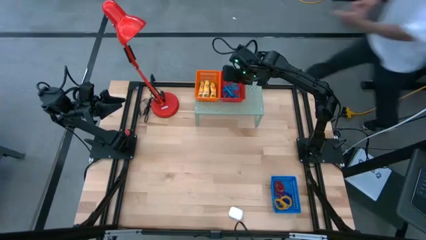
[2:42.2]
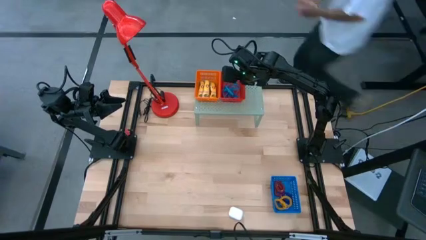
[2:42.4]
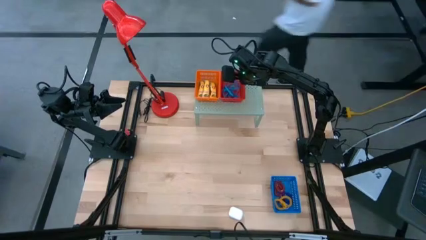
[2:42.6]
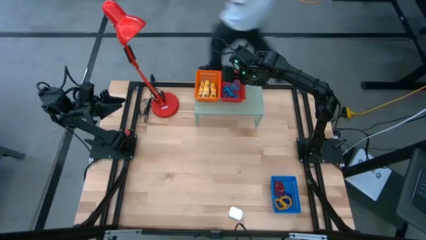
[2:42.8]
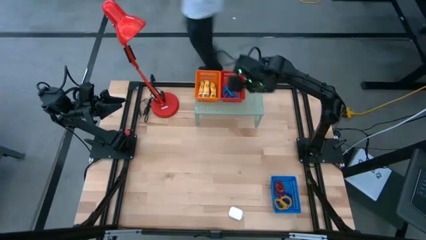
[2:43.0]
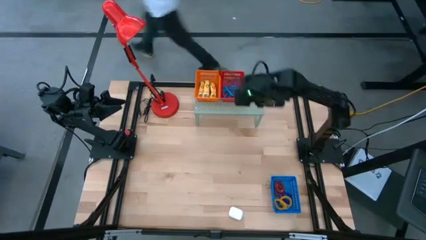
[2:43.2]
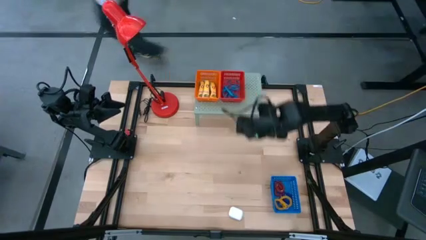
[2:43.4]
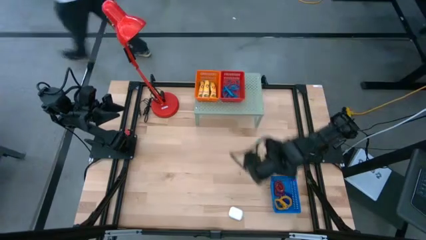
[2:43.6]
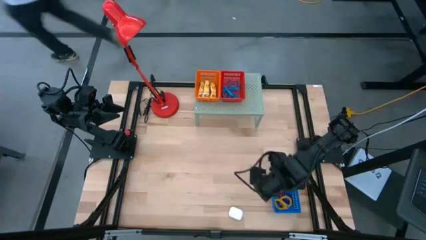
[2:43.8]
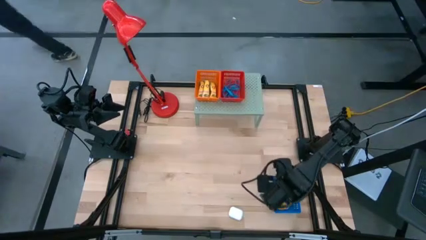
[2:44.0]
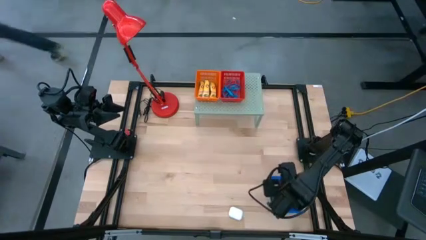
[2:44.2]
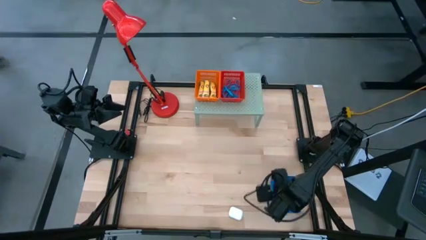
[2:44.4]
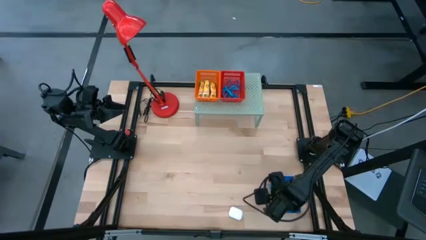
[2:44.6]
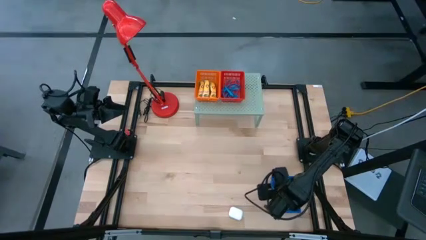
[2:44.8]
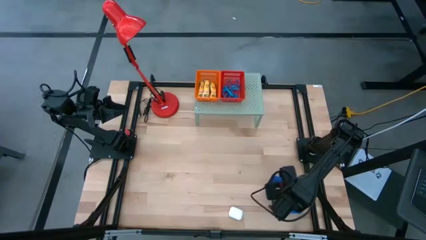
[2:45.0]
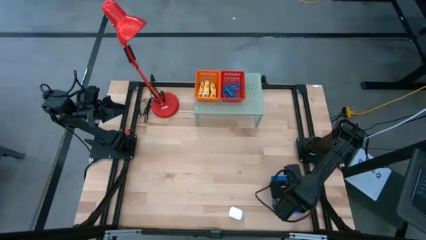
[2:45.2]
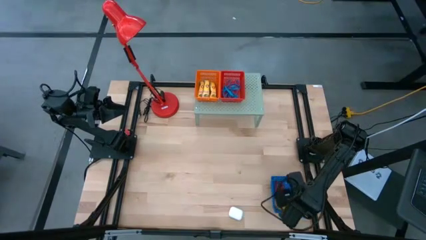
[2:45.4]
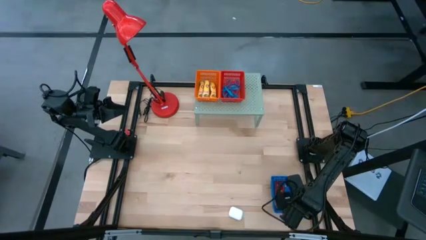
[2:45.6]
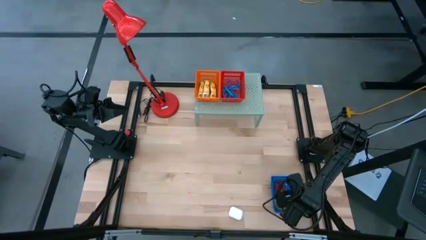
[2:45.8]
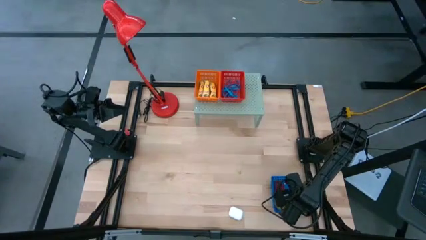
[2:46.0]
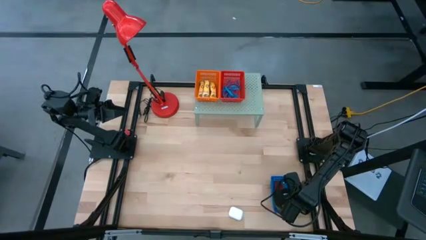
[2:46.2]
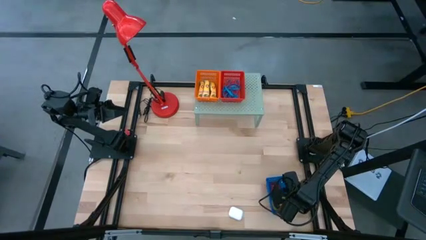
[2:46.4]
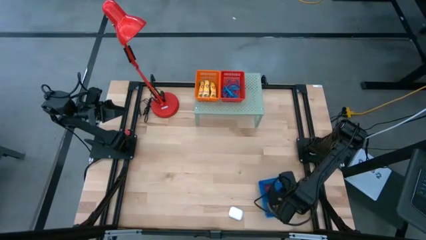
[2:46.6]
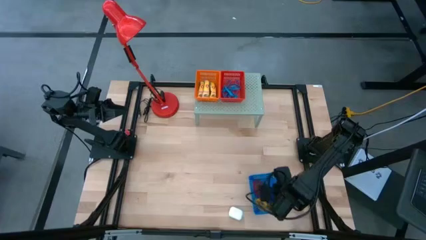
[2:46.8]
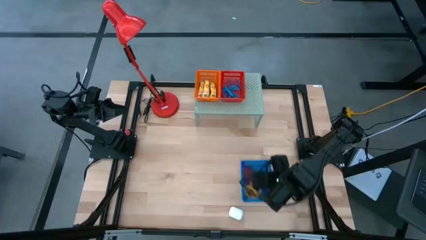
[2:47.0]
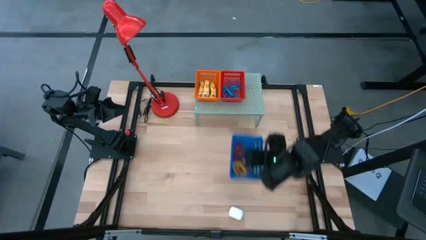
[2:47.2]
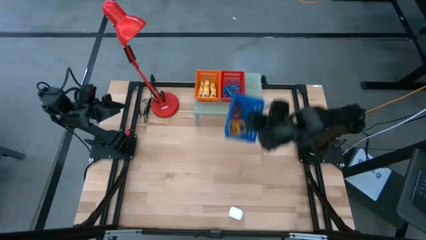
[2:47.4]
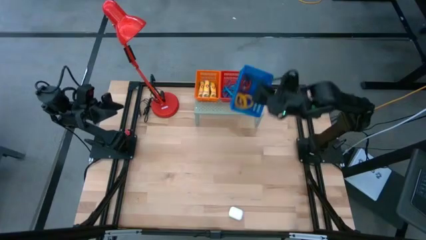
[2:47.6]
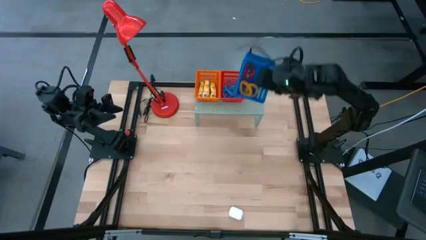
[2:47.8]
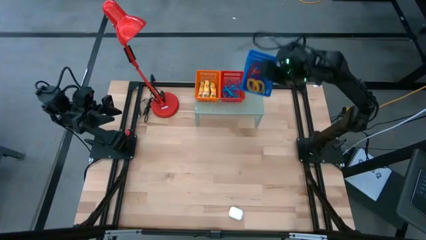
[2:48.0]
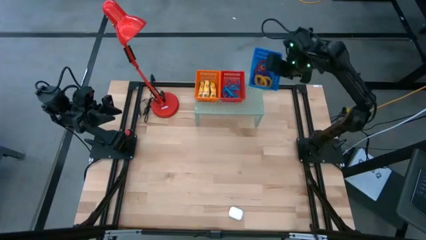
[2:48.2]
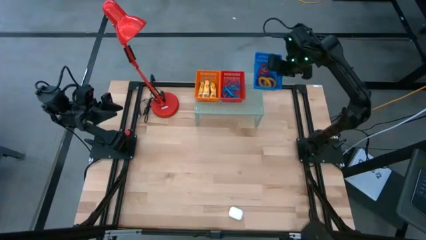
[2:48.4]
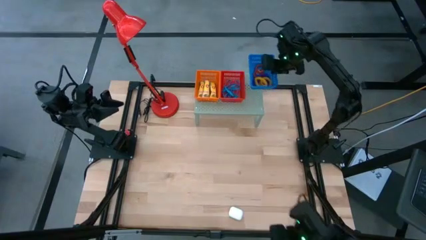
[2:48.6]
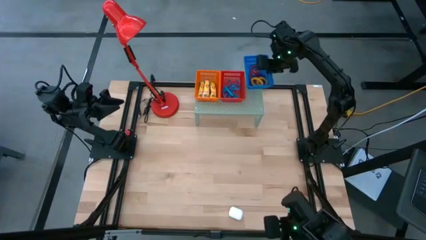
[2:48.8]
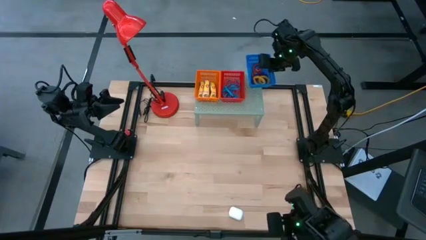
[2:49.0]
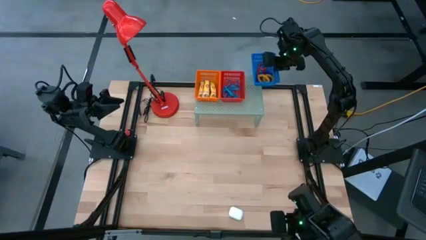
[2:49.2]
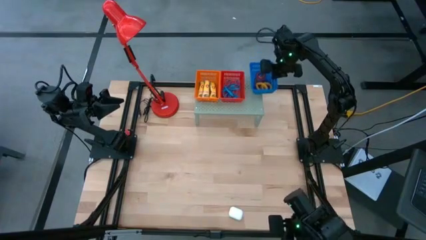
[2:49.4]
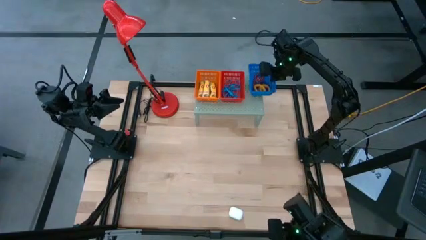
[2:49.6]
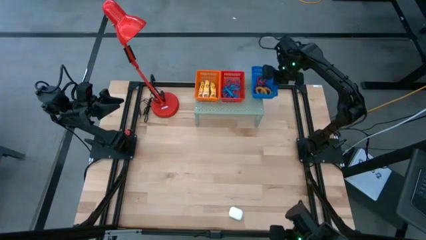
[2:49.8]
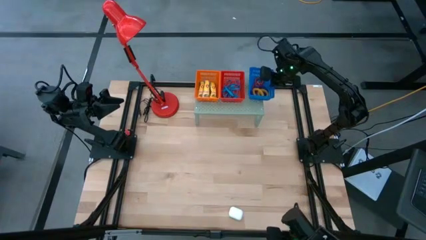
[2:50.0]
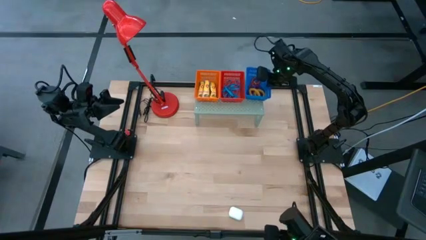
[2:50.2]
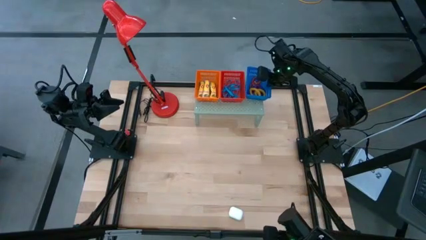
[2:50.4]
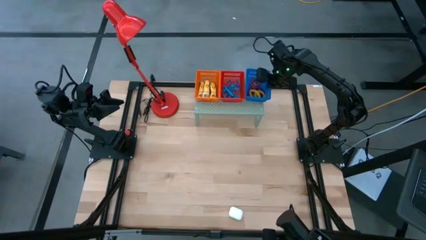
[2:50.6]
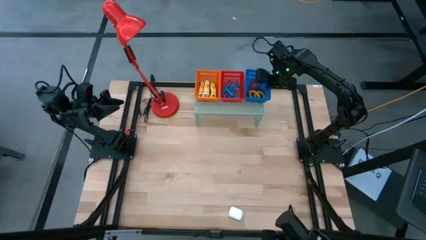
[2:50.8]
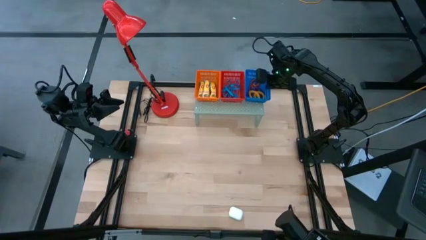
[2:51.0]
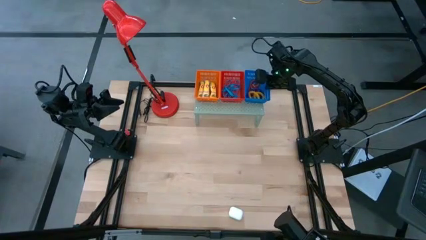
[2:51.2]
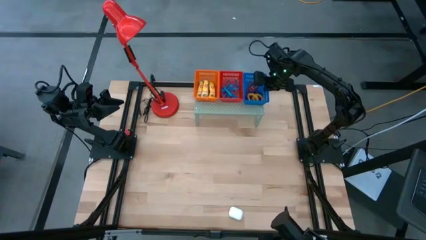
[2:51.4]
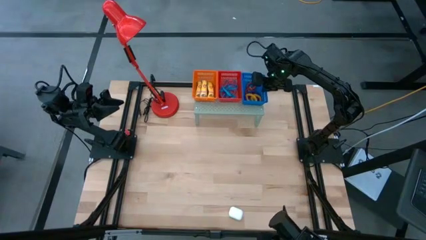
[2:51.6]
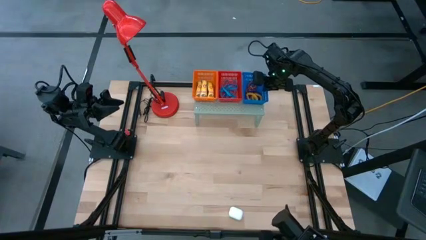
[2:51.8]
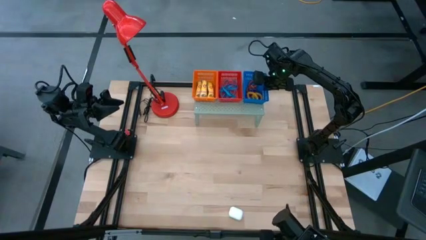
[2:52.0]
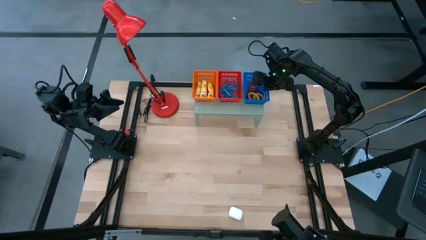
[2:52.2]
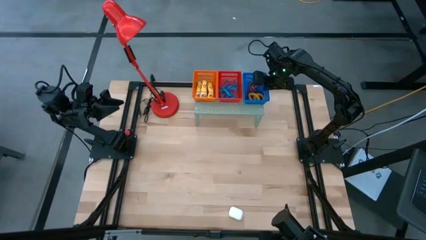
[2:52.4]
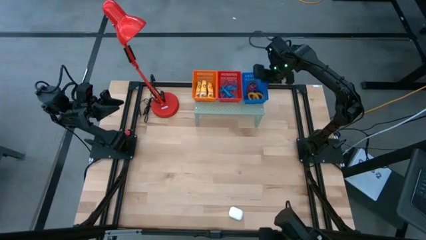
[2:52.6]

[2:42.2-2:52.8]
Task: Pick & Place Office Desk Supplies
Put the blue bin on the shelf

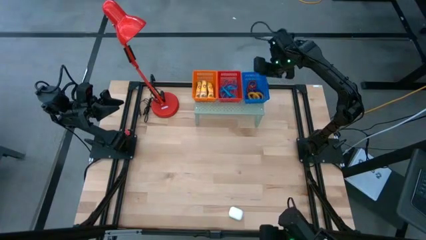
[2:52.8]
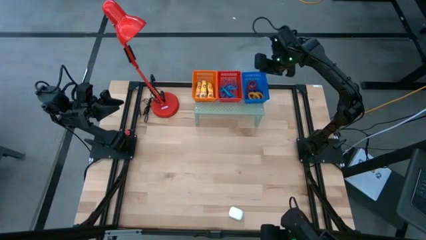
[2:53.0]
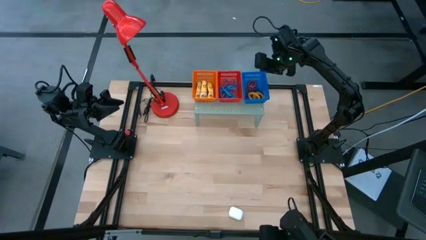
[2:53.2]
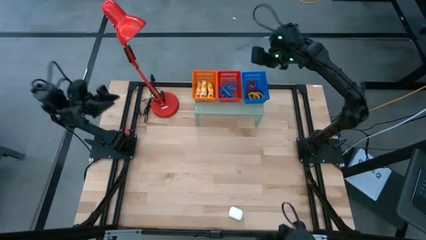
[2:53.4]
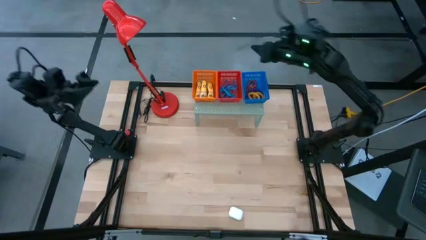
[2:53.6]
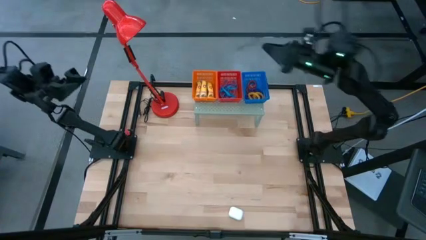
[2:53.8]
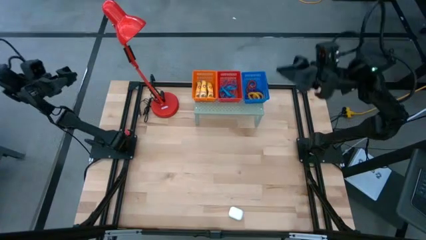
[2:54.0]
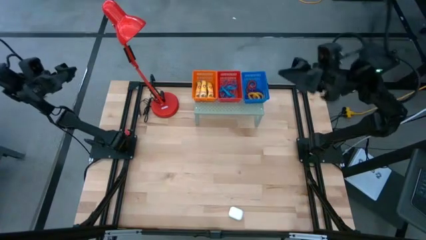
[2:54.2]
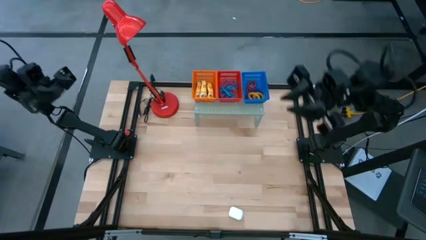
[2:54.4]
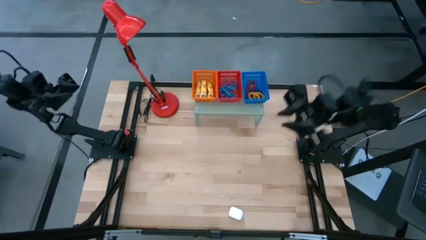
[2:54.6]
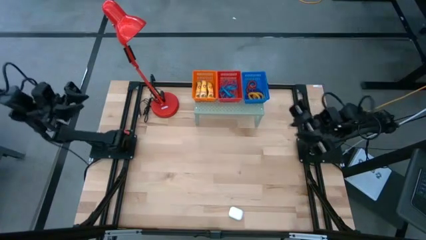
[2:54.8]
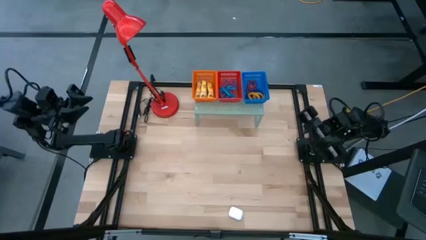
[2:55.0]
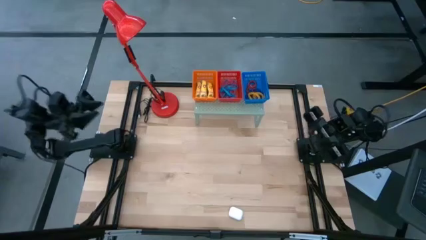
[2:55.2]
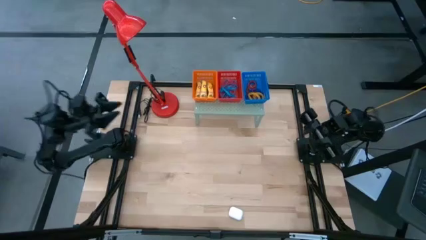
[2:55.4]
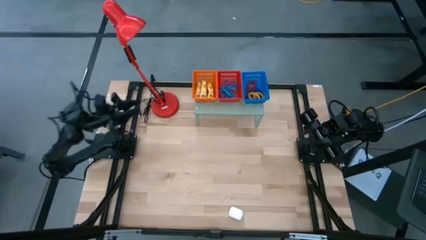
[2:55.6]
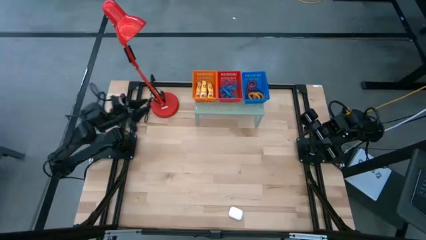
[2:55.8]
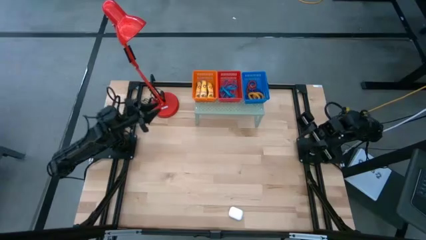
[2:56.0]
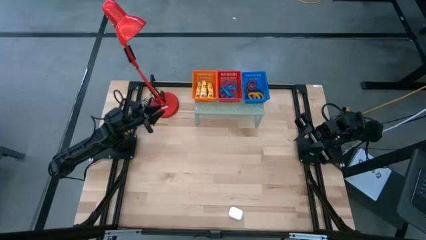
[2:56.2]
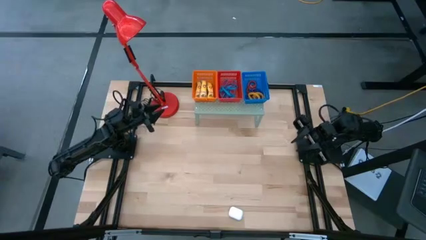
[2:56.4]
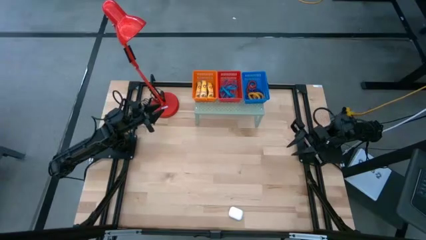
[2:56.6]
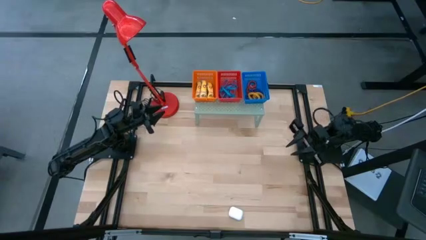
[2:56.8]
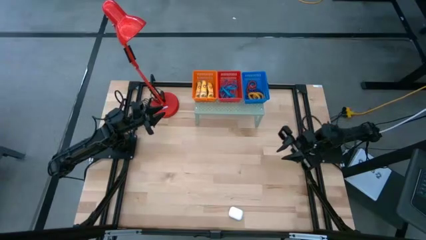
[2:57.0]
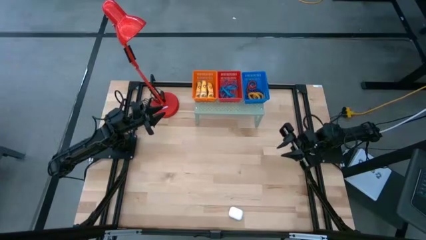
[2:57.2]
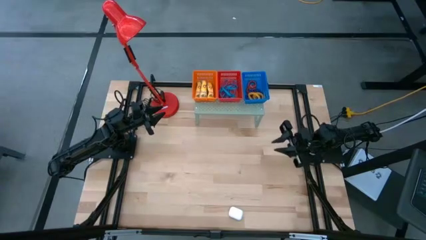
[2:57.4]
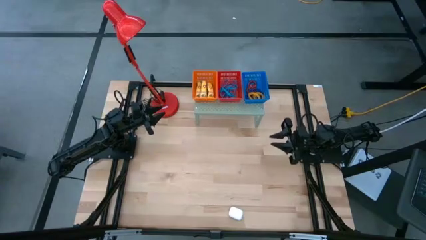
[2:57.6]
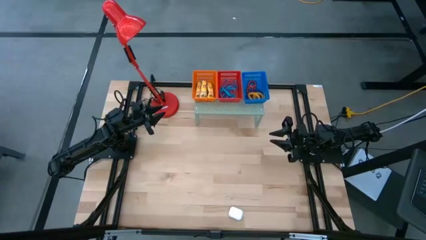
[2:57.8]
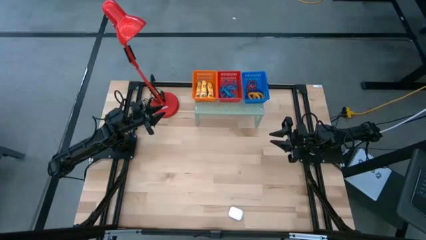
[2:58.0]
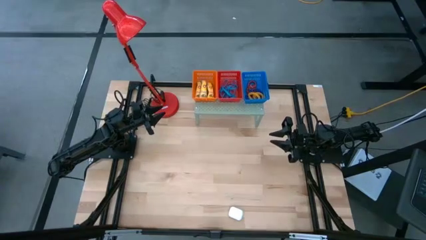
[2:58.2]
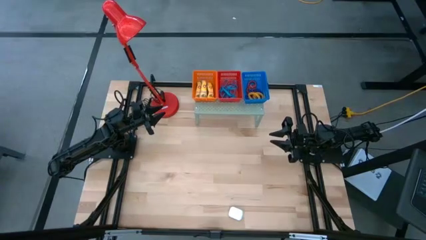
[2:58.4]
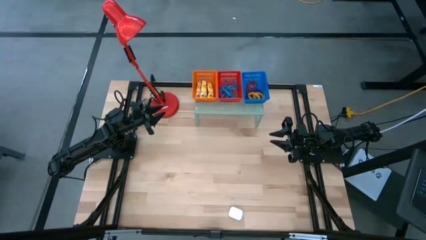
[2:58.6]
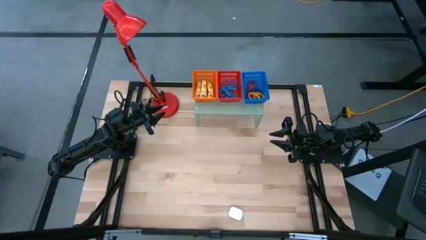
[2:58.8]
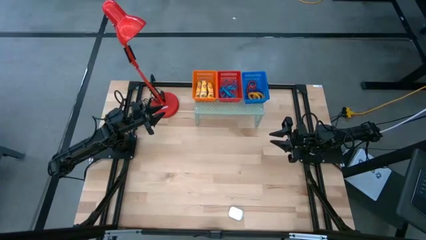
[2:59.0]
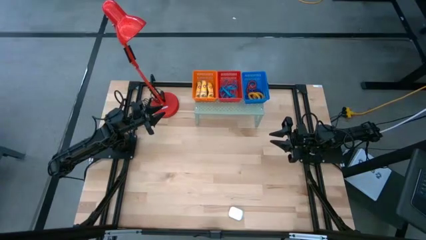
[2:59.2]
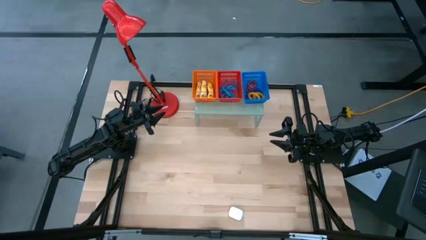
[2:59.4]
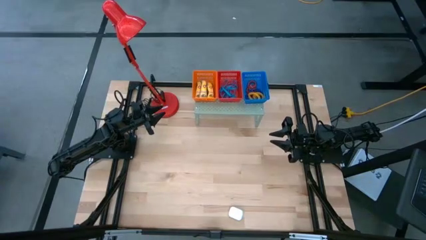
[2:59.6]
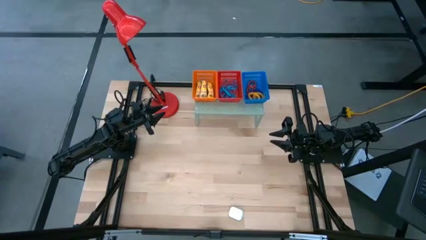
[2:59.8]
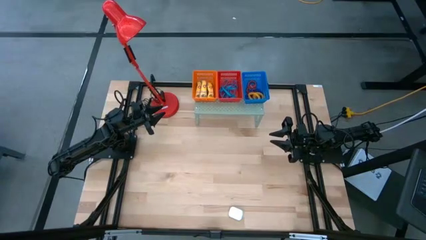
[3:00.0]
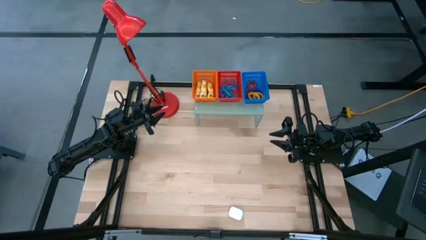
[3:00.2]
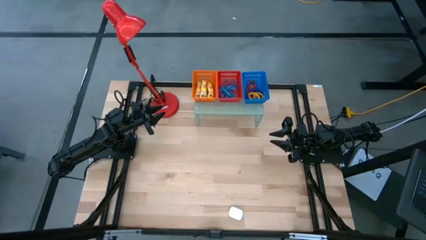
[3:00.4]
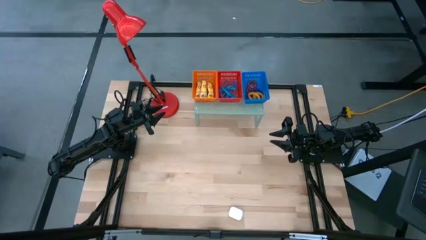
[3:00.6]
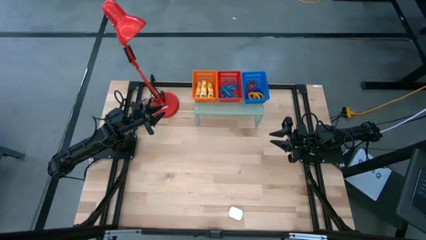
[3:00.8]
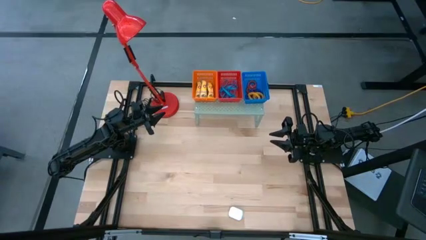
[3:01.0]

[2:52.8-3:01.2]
Return to Home Position
